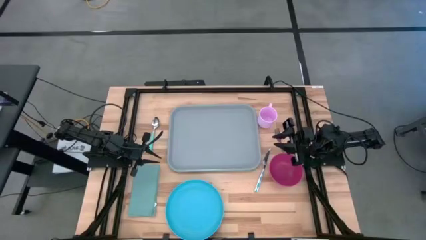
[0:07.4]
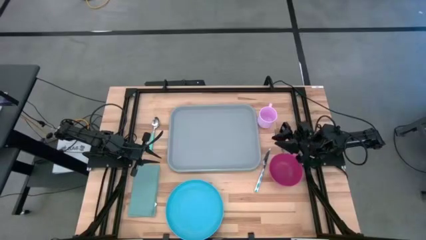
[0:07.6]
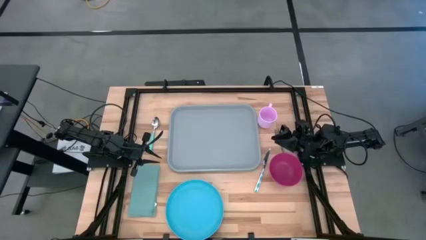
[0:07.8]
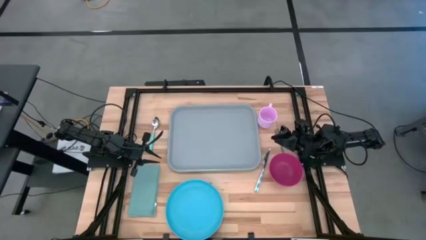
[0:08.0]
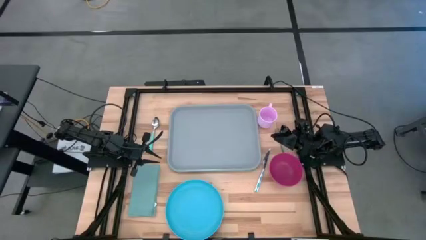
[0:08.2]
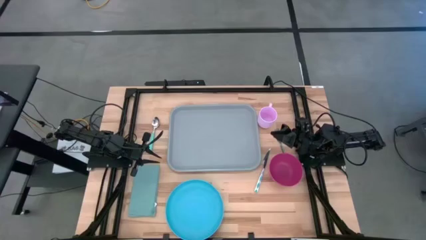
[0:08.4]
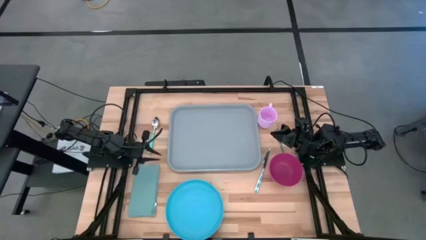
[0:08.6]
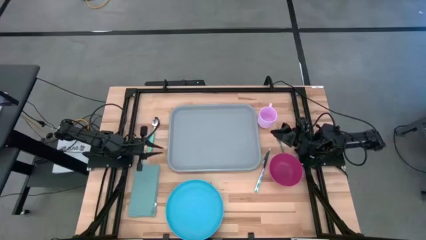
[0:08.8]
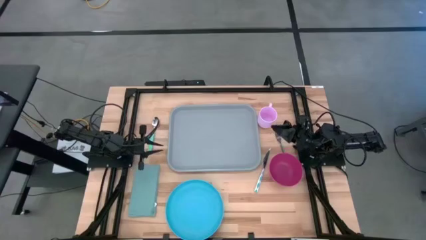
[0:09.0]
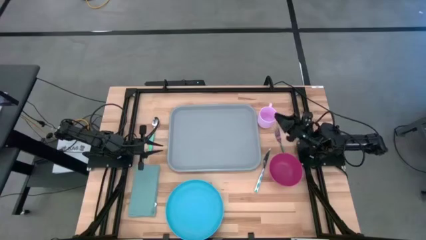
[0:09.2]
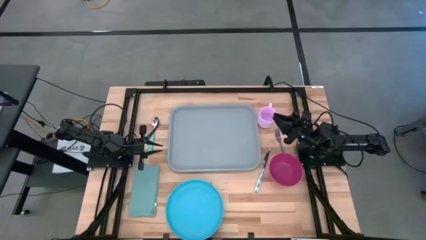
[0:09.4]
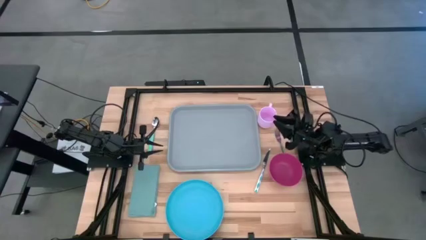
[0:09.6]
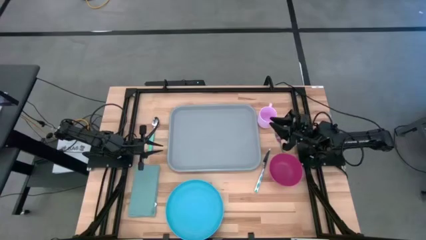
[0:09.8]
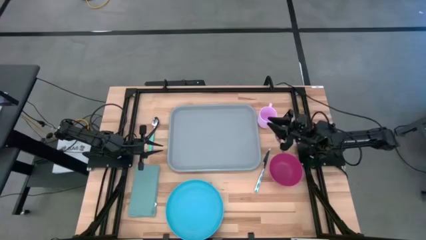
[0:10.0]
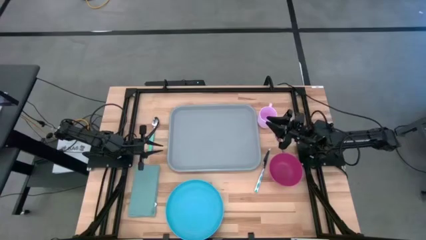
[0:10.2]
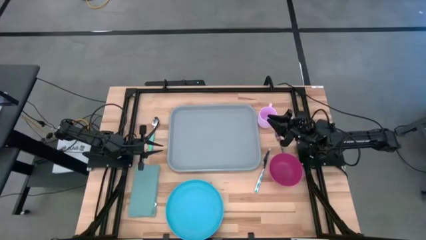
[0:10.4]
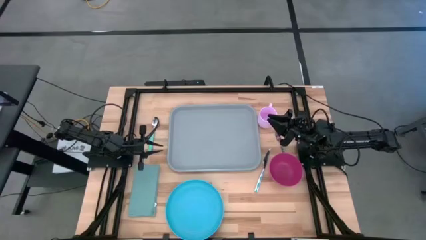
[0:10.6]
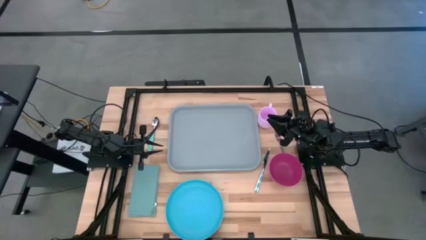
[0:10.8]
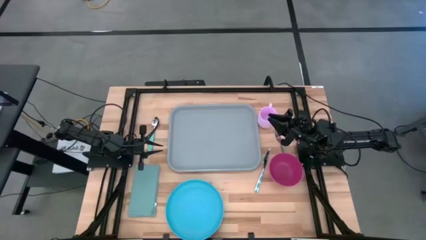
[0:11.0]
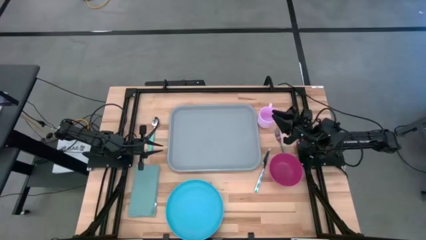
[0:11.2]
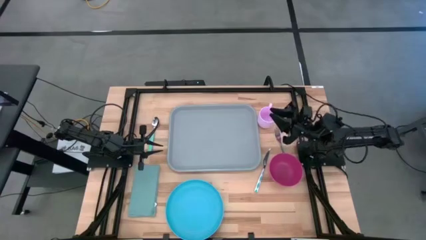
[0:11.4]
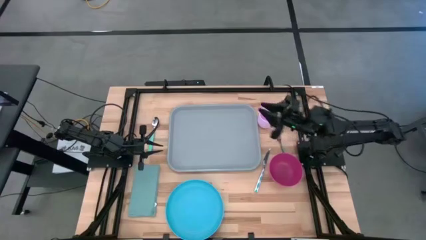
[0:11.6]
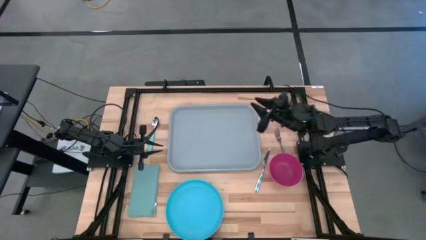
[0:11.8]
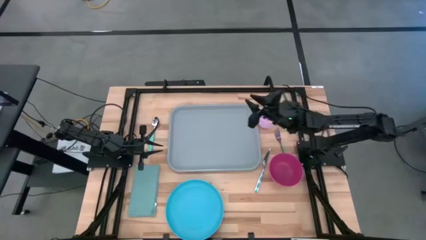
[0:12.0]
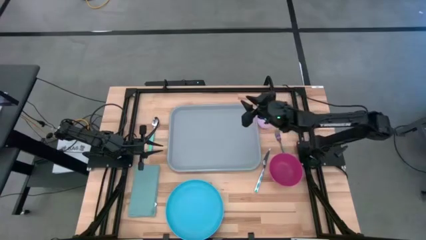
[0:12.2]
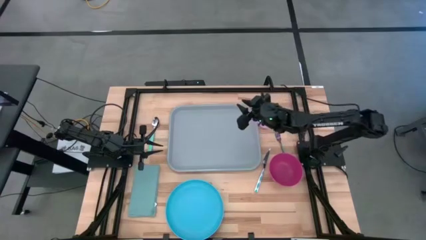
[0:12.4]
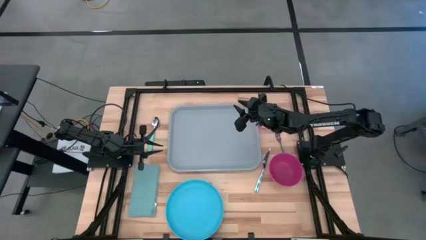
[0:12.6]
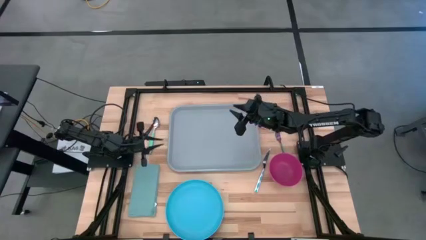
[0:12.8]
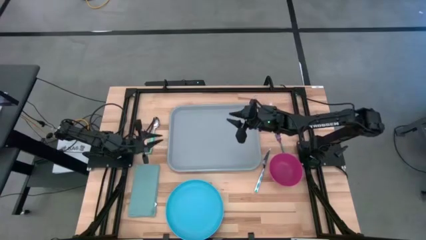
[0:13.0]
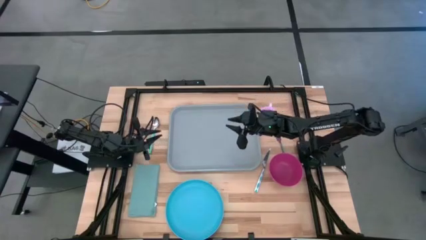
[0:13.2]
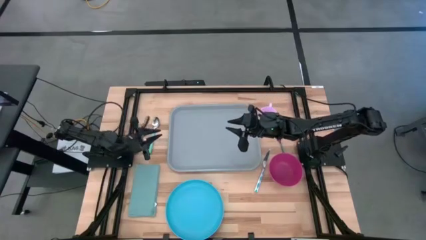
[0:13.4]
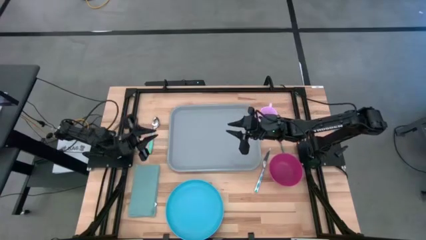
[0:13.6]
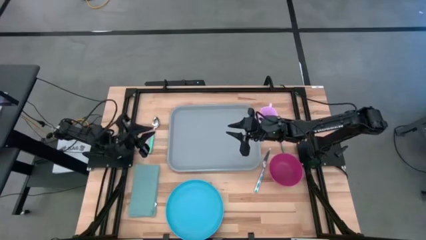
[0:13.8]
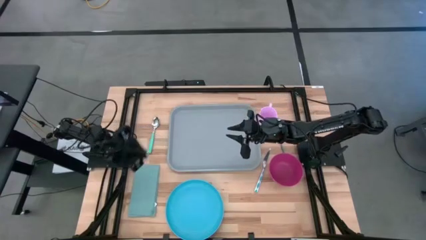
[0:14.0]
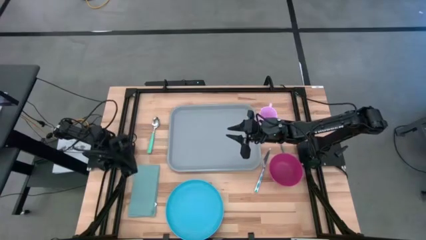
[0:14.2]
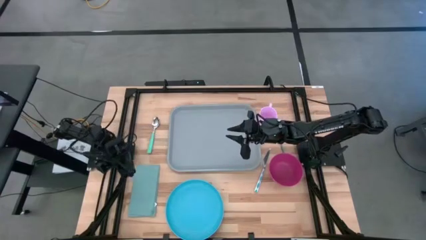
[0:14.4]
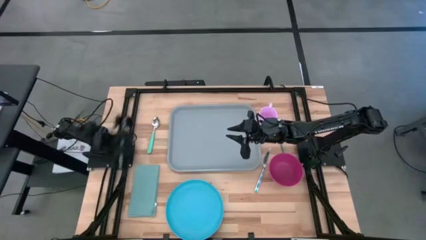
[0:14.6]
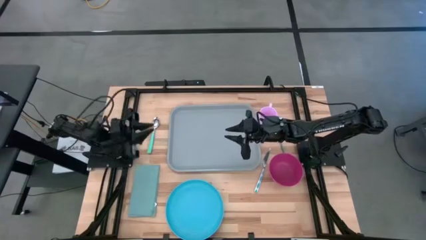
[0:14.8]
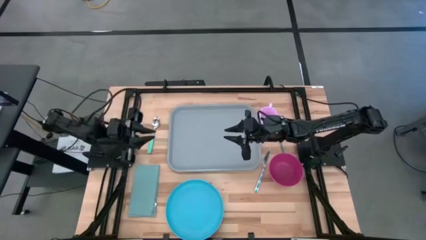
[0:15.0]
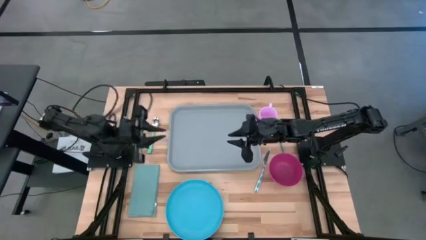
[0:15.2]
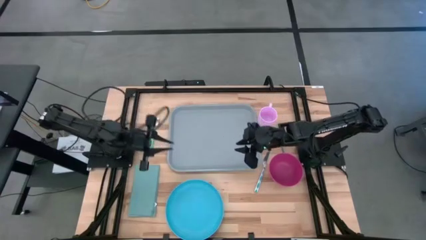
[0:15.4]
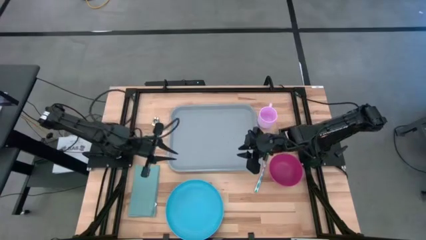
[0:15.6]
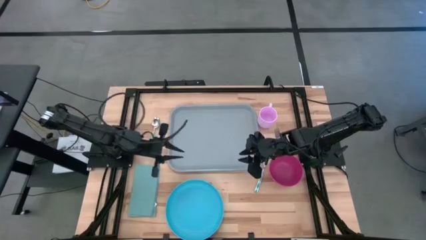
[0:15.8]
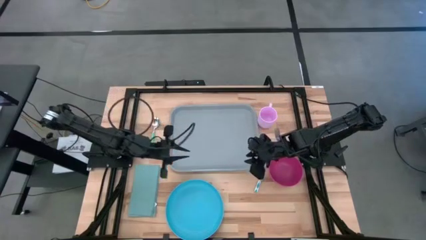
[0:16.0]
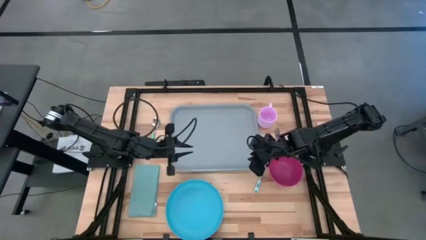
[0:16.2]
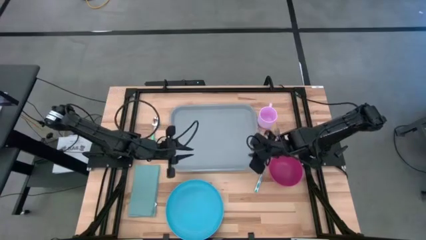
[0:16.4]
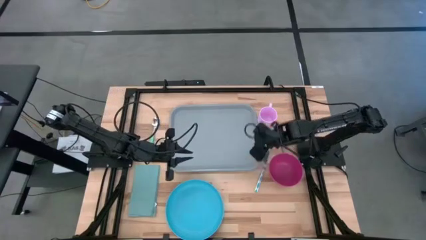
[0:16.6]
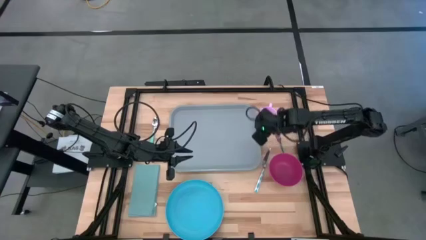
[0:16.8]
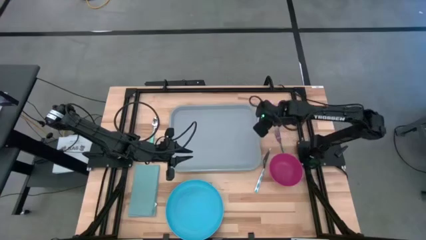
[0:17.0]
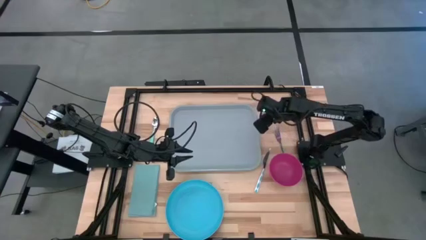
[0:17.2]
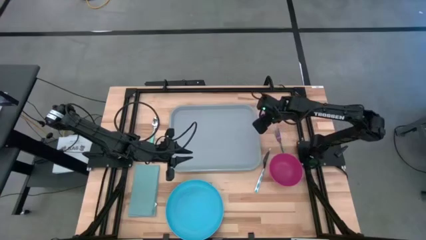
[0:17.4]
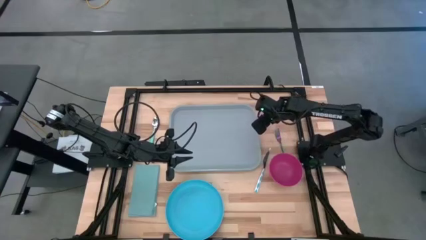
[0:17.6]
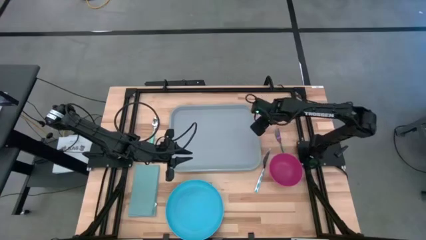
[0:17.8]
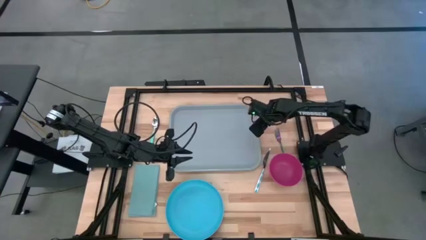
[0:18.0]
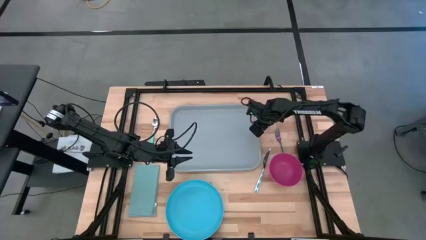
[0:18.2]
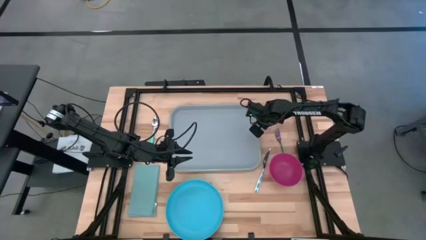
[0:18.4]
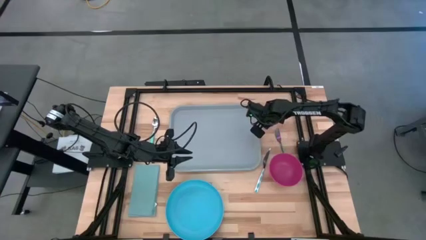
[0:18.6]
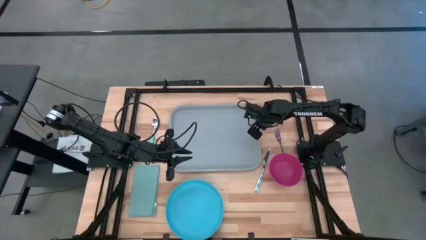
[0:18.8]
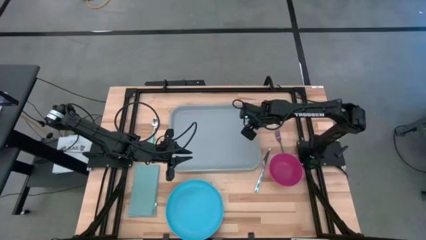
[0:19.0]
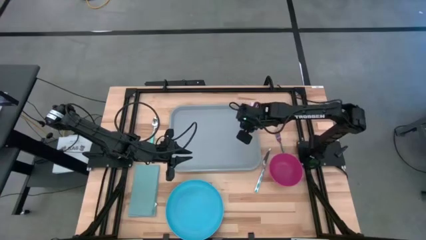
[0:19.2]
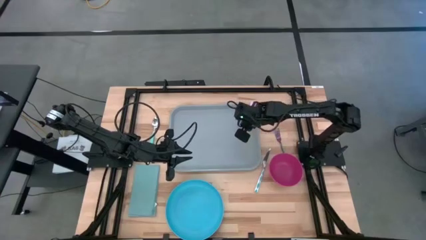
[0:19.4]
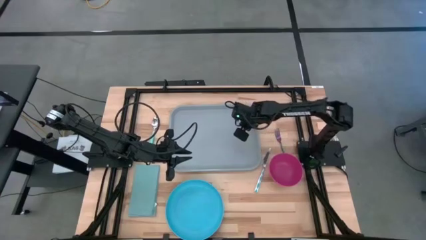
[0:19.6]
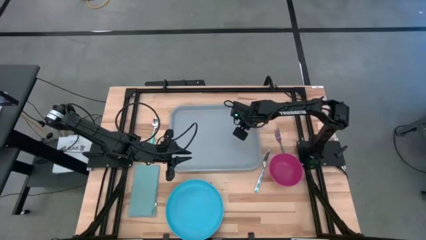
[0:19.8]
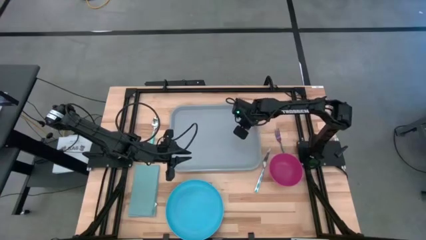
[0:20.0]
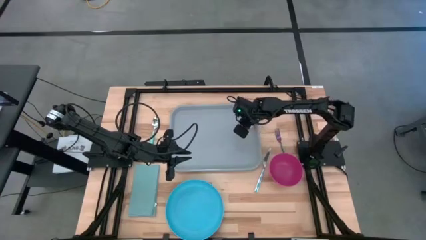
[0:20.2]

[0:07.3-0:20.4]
Task: Set up tray
Put the pink mug on the gray tray

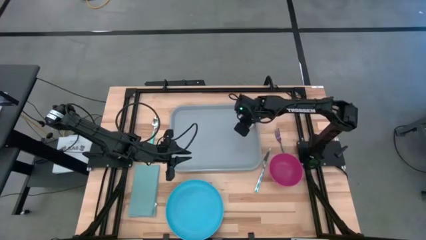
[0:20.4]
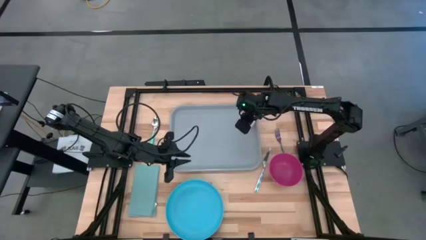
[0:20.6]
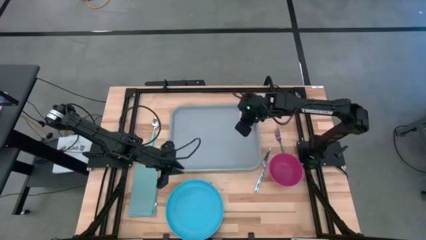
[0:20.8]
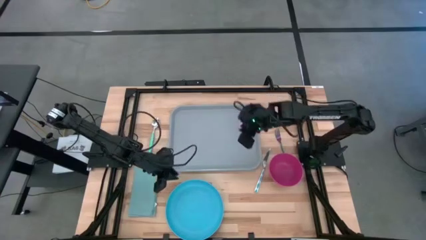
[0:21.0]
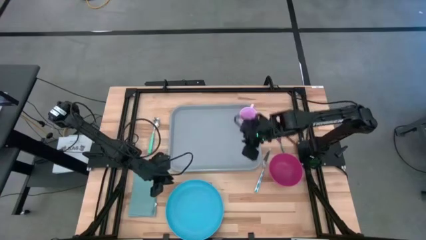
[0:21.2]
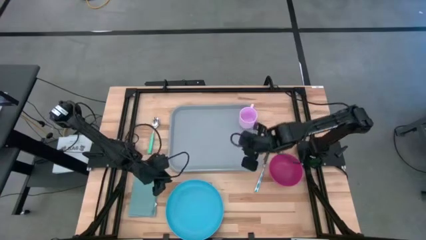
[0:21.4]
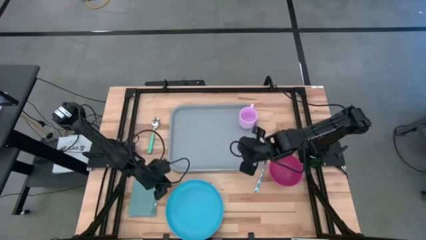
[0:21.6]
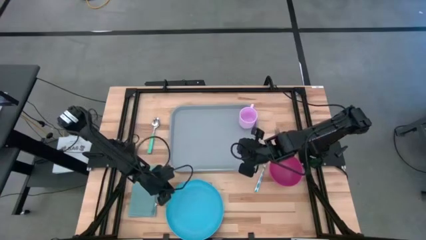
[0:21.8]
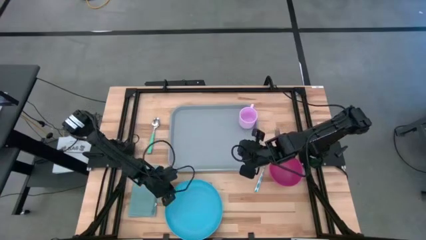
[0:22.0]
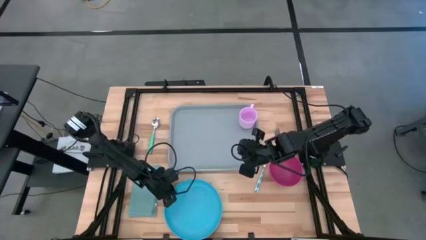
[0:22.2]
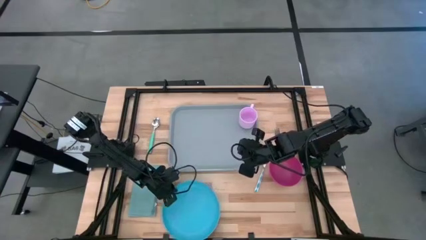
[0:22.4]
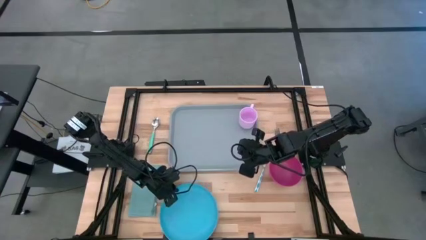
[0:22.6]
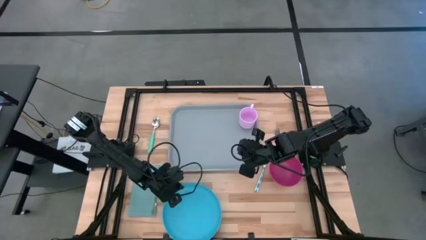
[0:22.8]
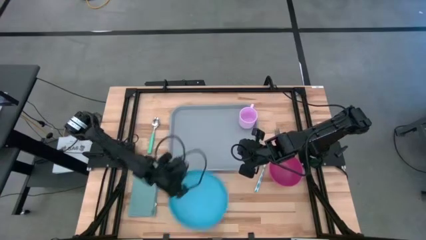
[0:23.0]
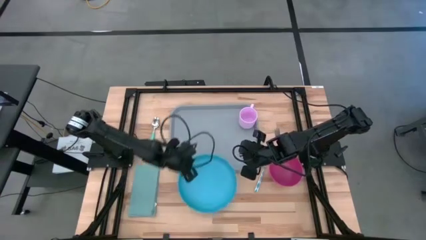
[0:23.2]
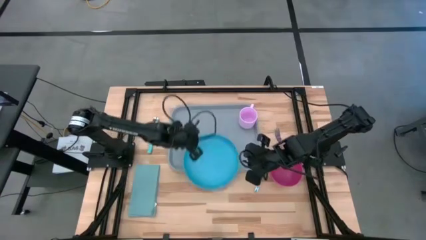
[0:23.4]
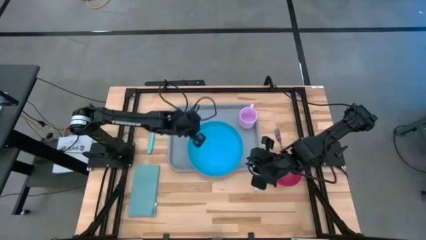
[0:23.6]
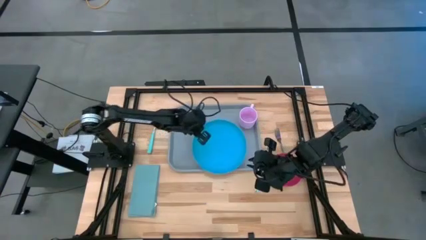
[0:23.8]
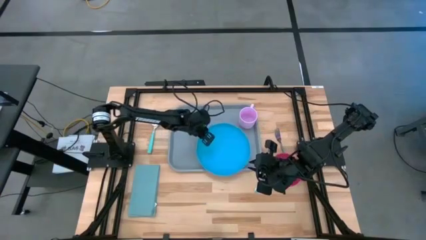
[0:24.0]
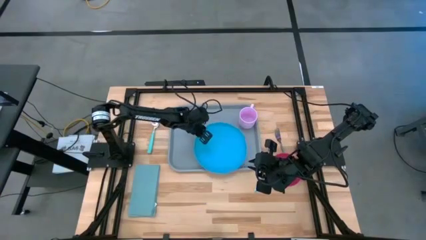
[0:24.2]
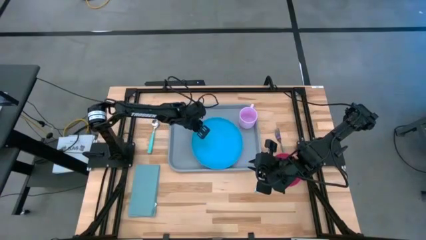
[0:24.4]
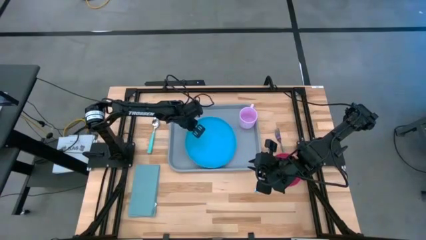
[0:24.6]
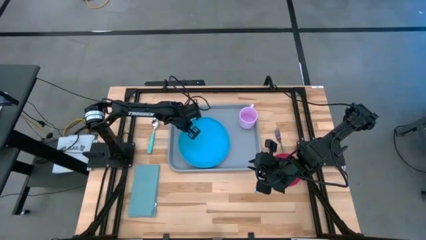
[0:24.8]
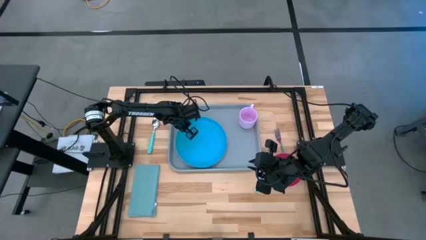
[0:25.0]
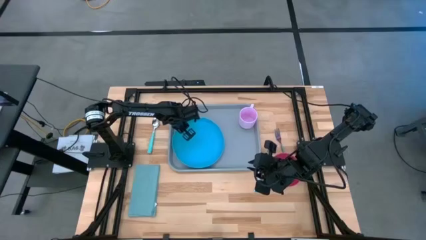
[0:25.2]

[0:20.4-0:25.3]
Put the blue plate on the gray tray to the bottom left of the pink mug
